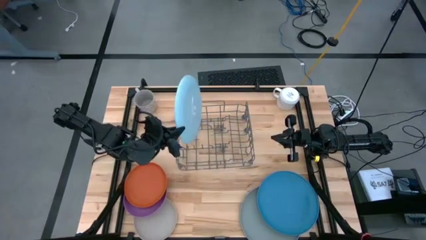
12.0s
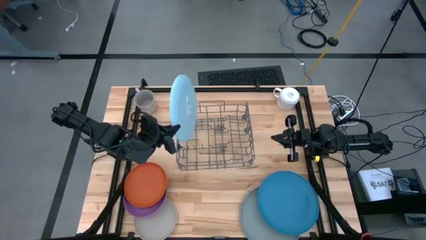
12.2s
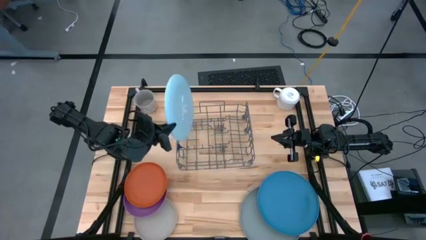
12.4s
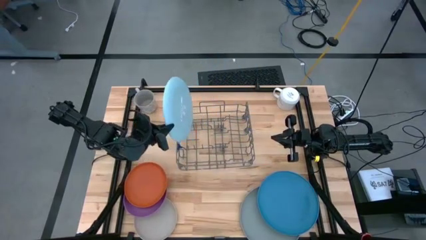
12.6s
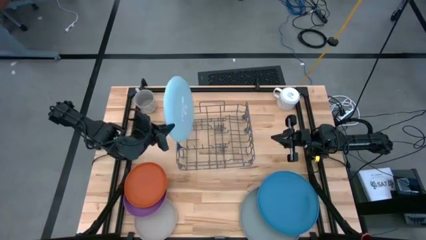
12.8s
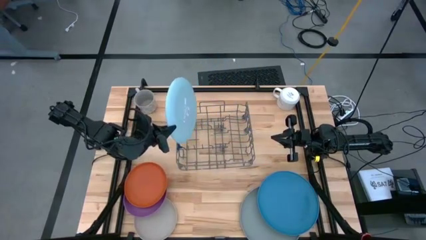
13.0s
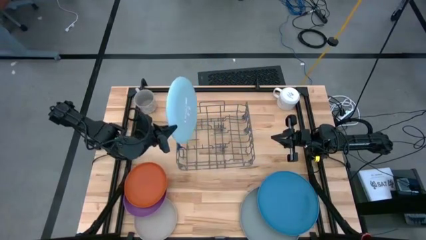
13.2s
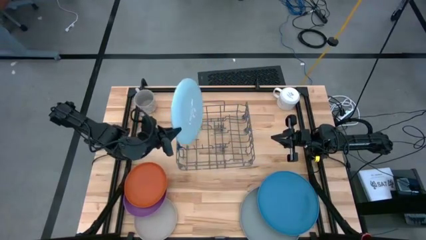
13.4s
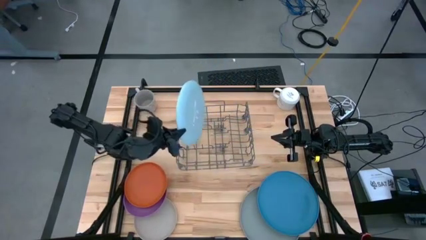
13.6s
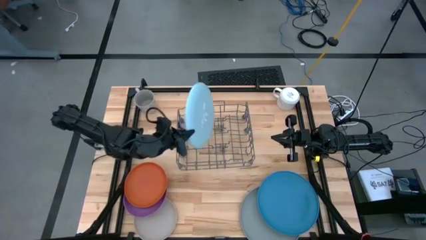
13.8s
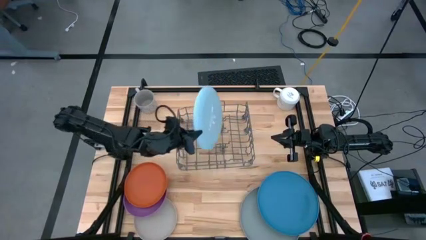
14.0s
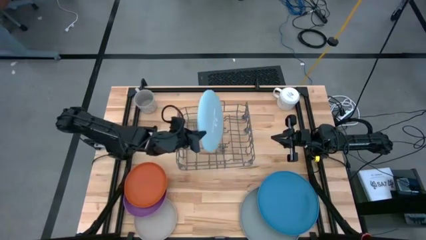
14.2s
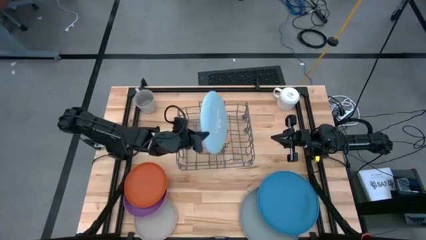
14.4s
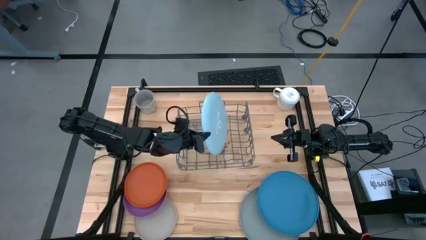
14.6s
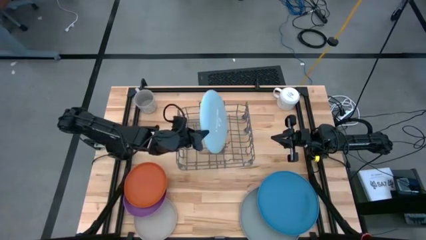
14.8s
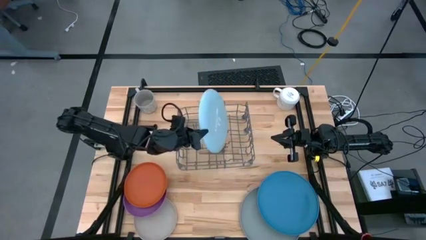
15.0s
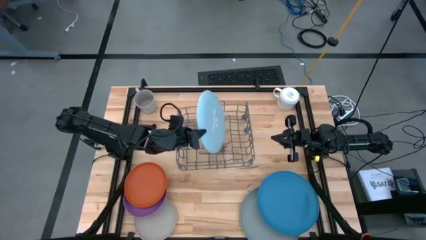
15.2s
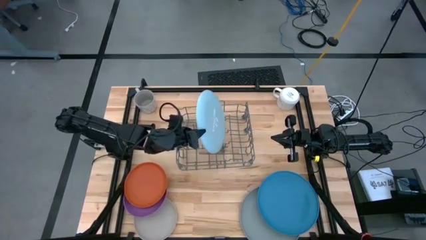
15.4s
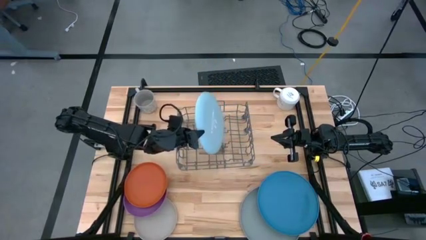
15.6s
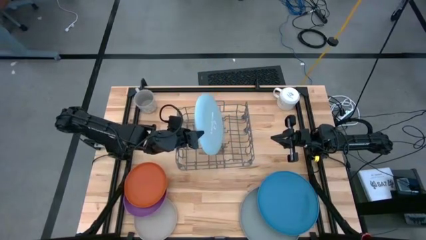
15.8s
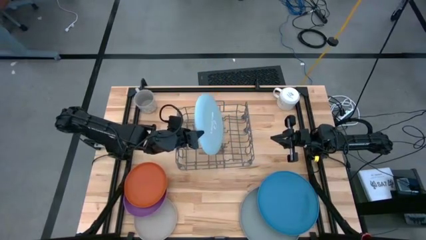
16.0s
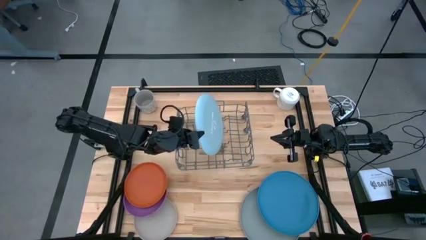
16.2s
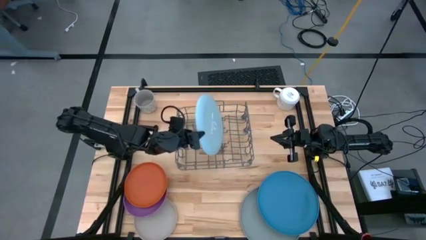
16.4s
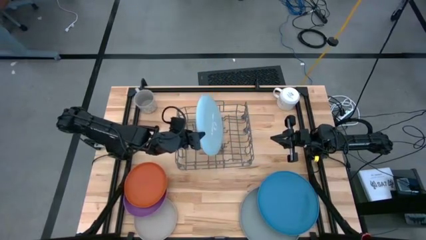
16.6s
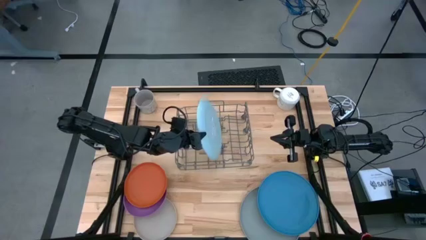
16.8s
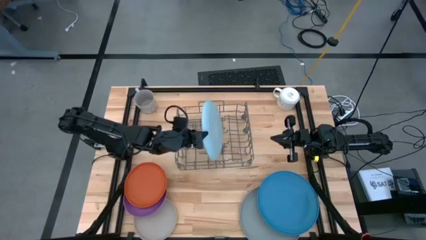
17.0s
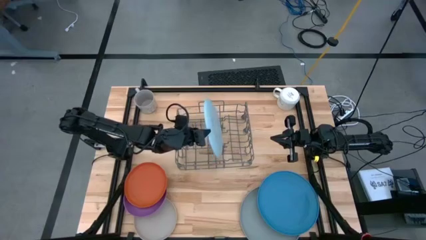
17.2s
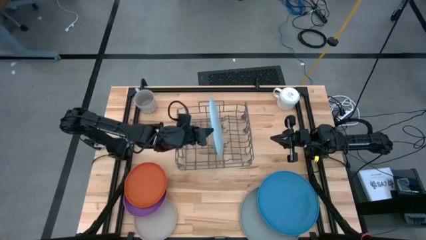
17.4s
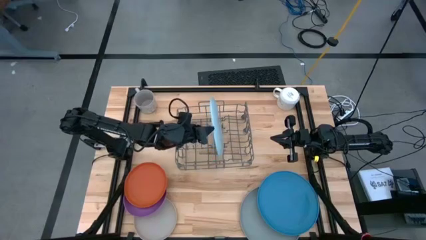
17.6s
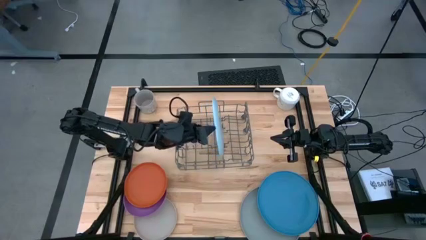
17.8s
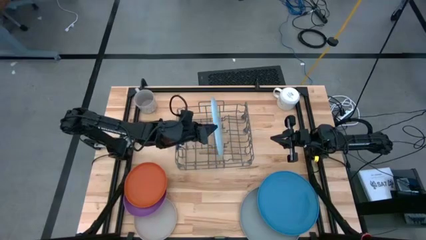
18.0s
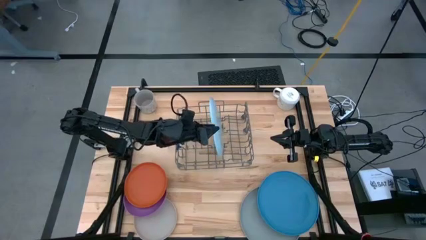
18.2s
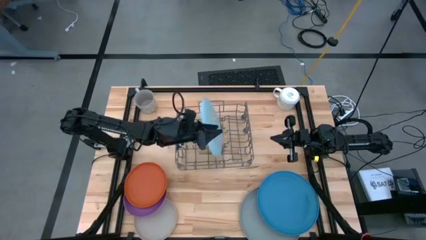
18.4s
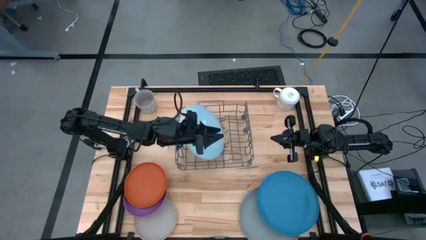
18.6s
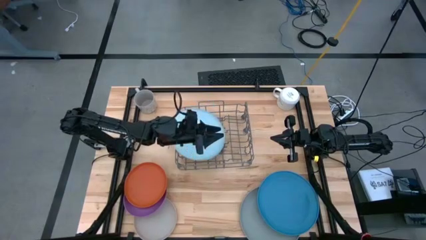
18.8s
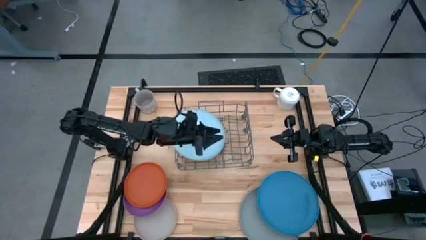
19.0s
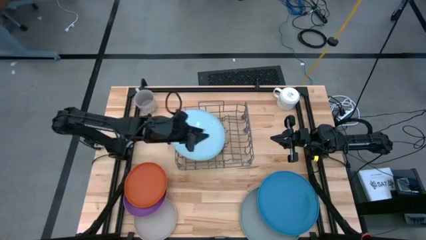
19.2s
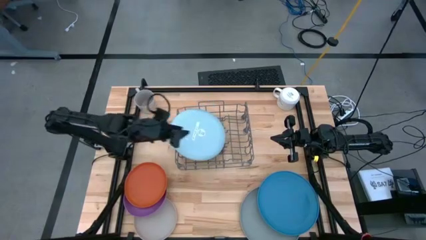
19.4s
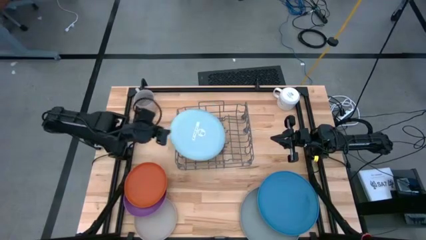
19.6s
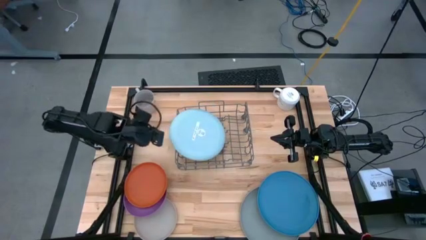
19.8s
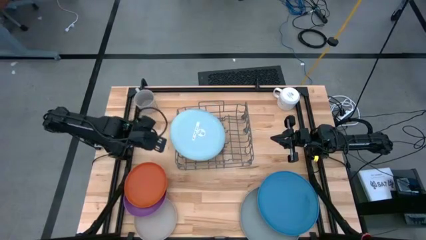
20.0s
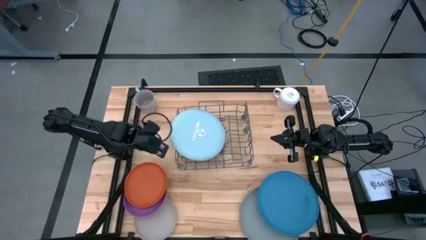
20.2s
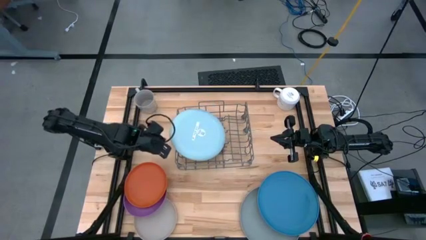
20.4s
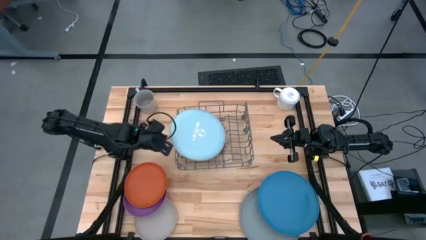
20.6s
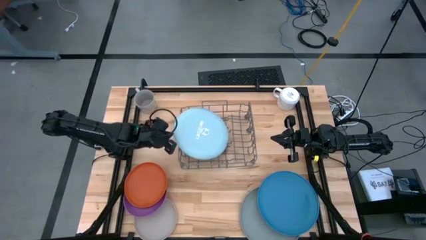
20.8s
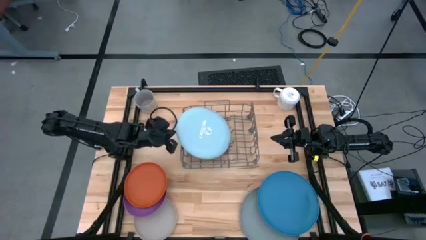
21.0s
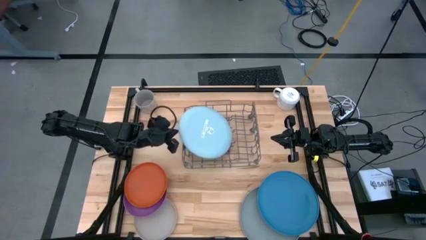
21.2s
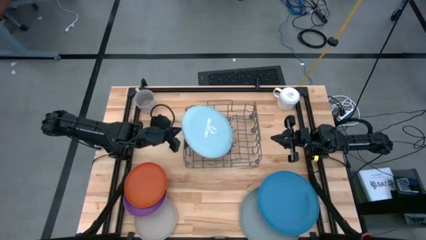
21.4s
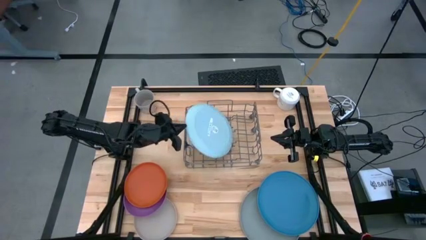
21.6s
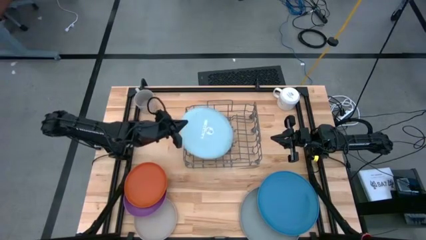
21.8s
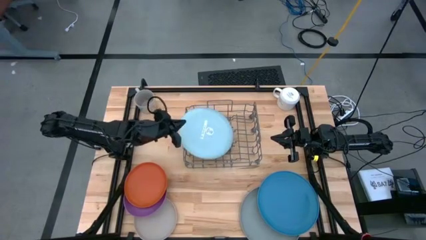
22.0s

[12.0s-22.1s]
Task: Sort dishes
Put the light blue plate in the dish rack

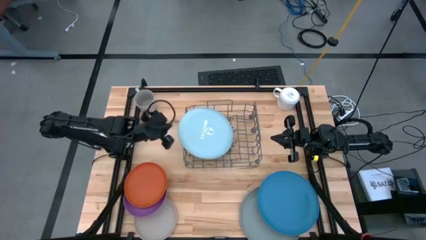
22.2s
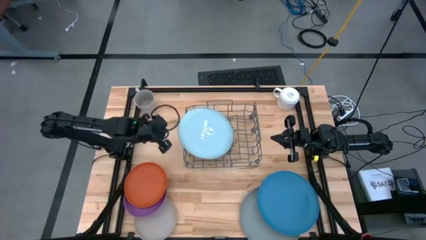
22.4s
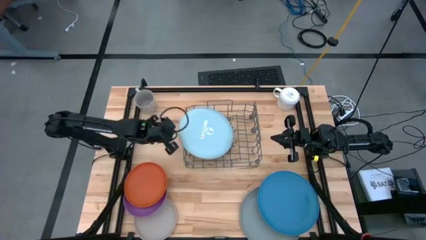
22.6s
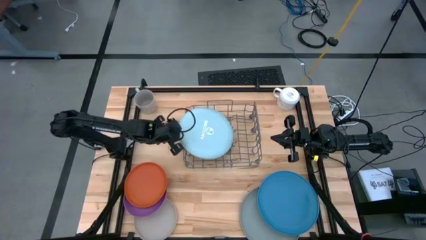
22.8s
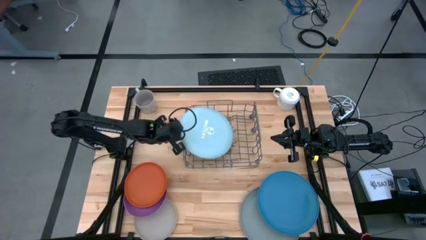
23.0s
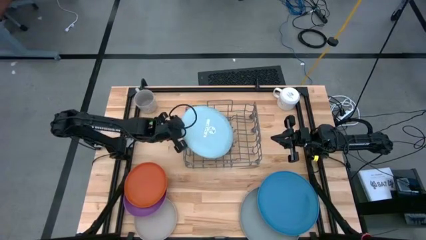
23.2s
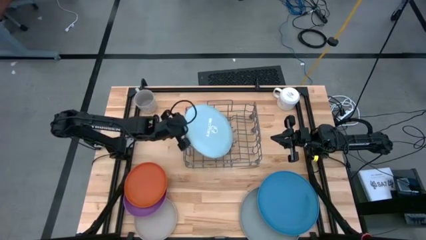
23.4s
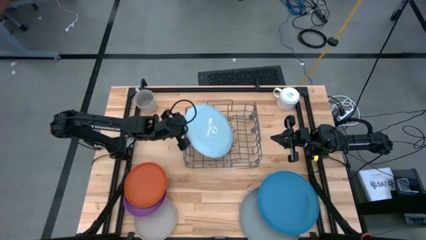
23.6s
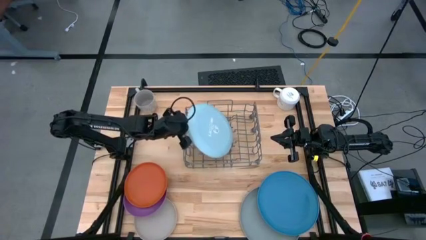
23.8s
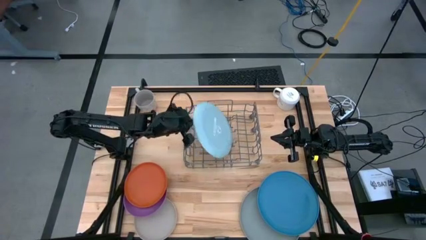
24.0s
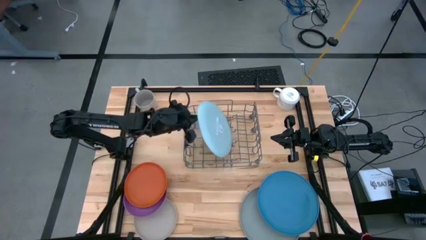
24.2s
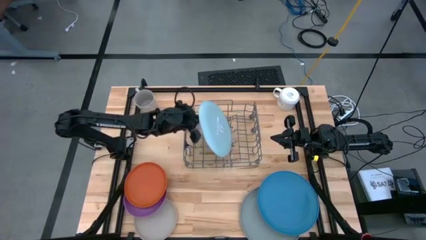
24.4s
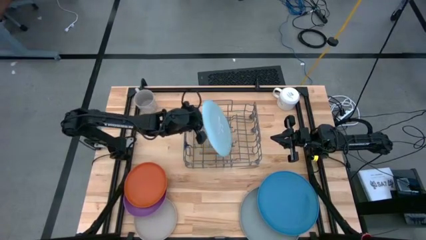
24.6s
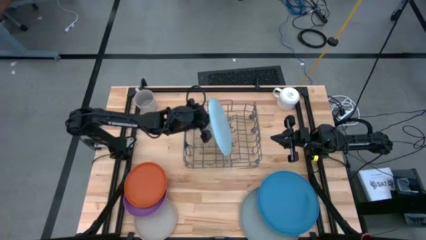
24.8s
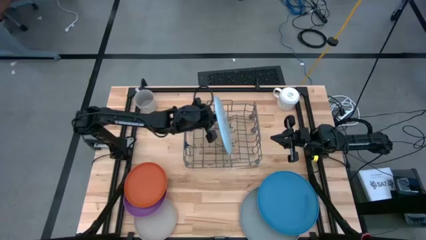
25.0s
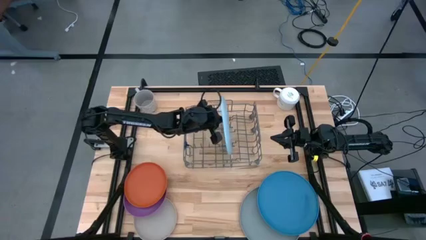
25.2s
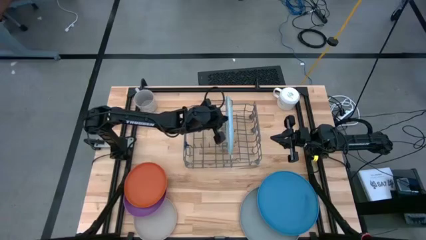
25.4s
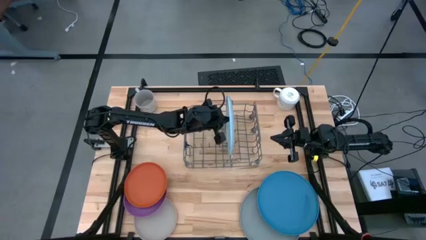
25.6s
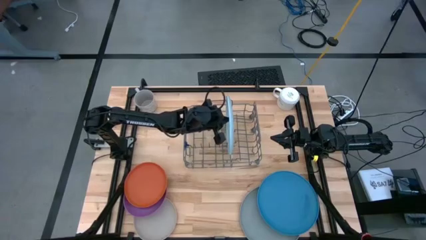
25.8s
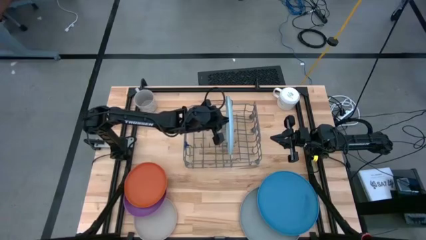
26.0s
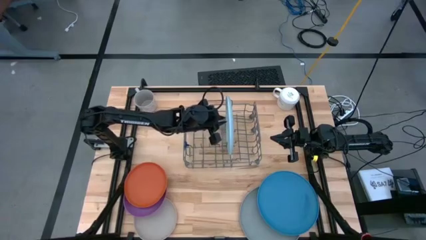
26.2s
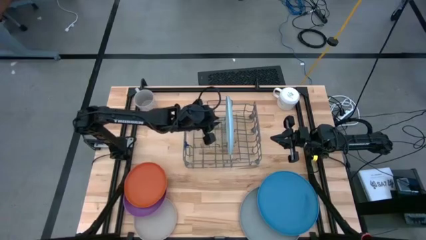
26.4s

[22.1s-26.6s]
Put the light blue plate in the dish rack
